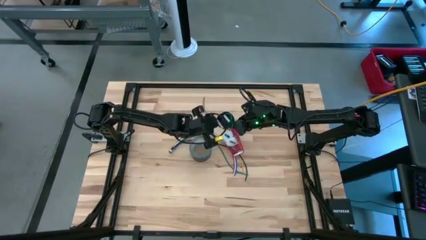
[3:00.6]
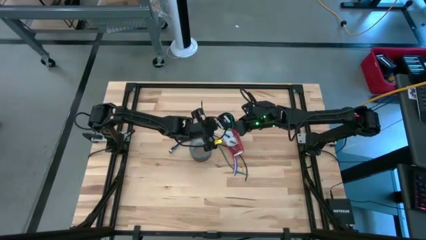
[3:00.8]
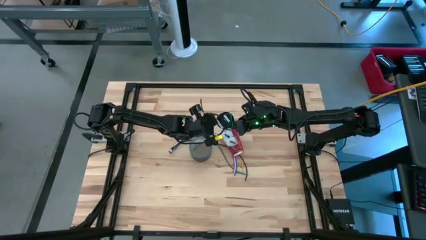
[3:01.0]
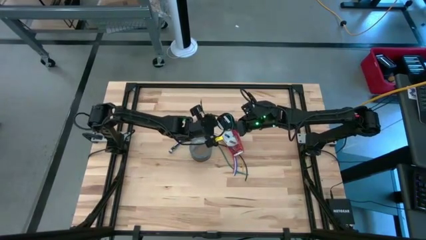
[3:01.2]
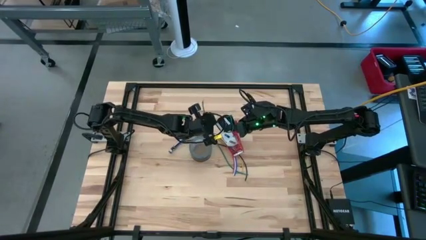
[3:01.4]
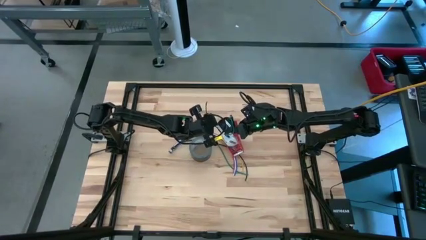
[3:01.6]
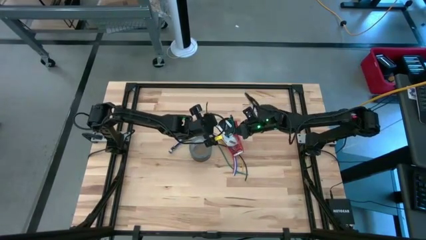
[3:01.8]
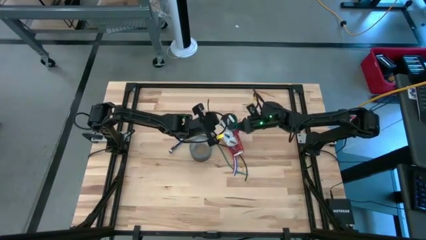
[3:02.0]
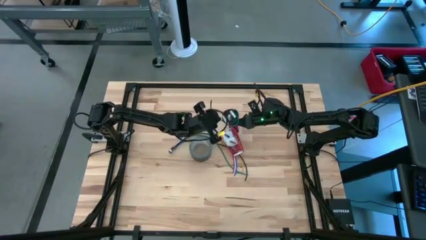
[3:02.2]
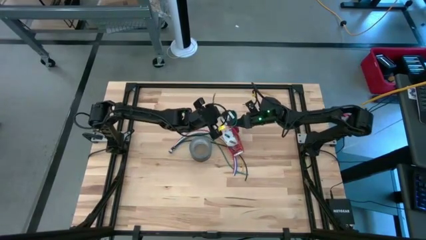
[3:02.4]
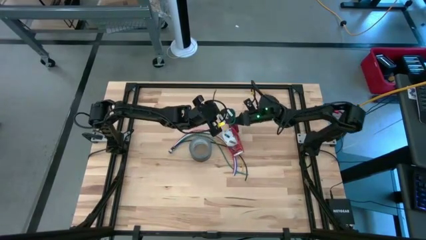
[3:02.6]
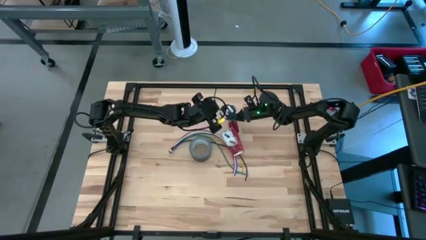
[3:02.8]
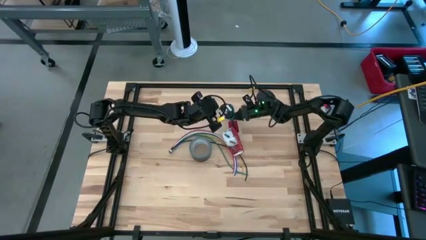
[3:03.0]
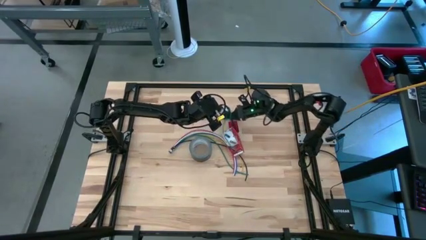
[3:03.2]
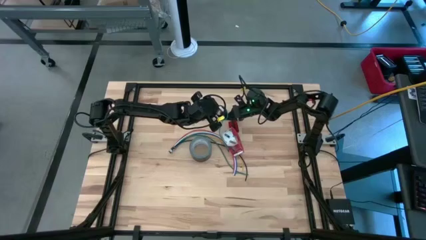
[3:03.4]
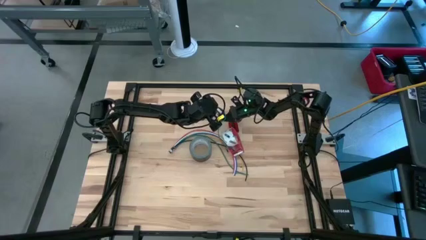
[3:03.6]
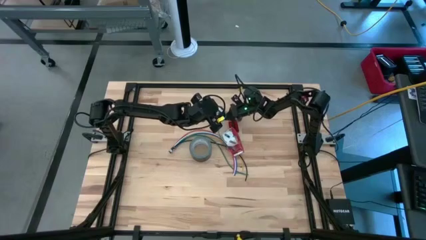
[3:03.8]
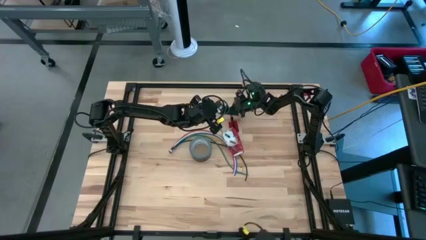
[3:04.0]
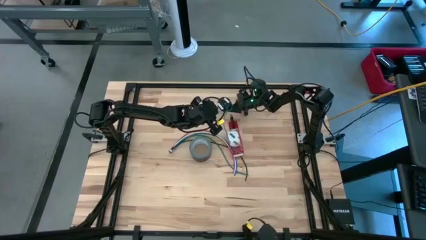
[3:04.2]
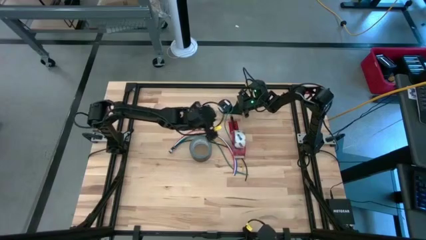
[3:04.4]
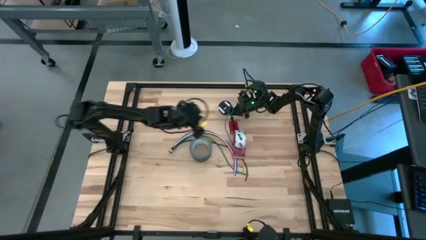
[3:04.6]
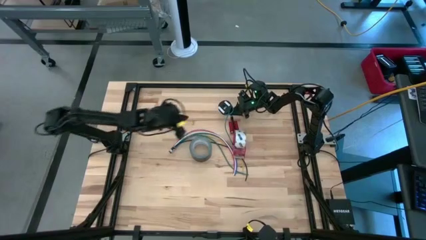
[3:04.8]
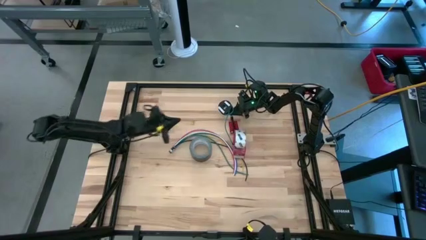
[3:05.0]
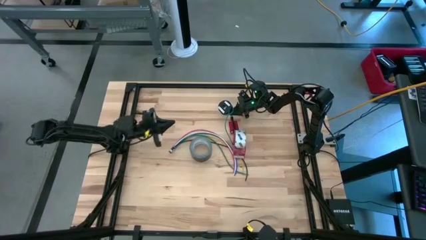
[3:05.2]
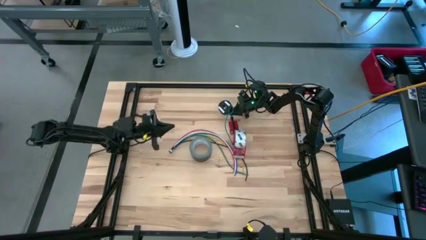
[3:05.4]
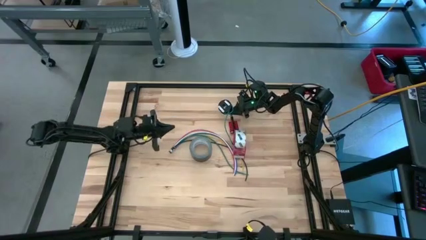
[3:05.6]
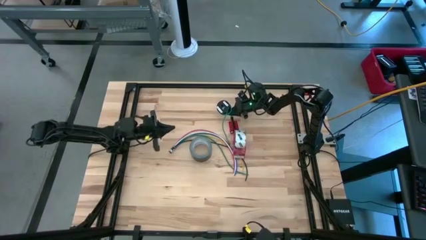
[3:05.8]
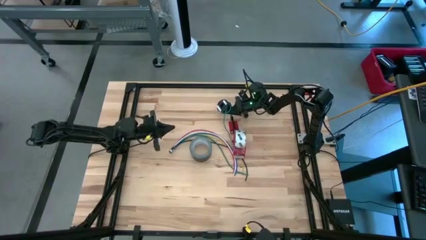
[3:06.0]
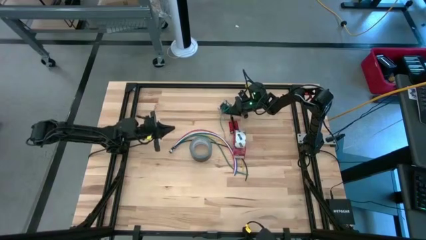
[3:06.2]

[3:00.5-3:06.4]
Task: Coil cords
Put the coil wire on the table

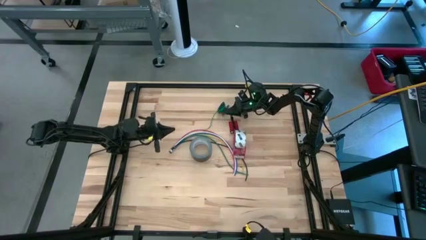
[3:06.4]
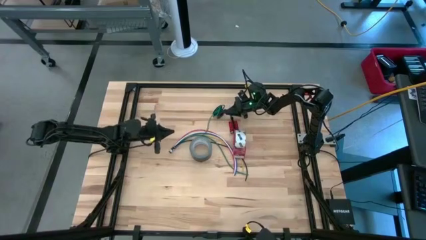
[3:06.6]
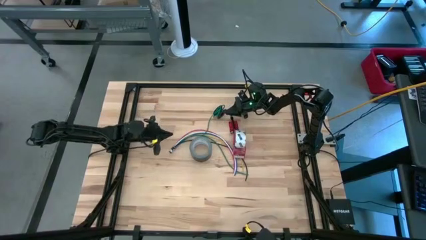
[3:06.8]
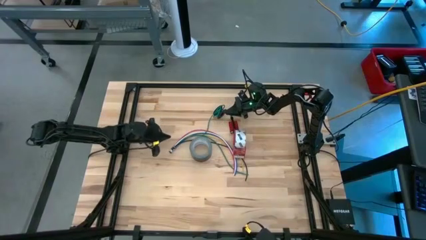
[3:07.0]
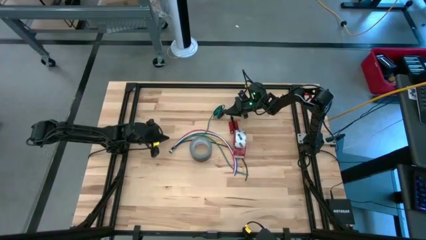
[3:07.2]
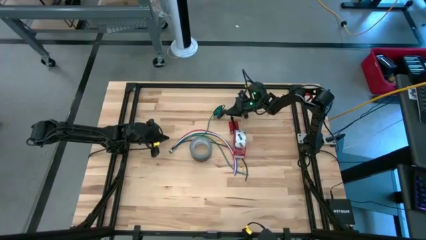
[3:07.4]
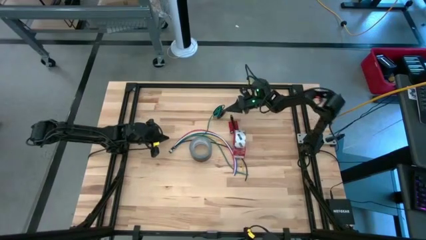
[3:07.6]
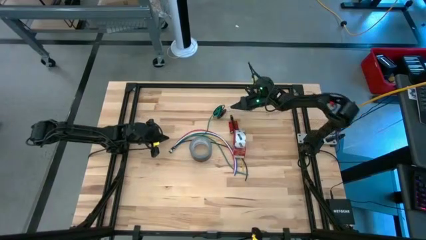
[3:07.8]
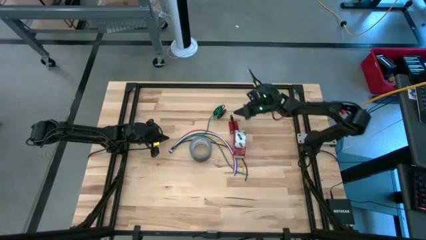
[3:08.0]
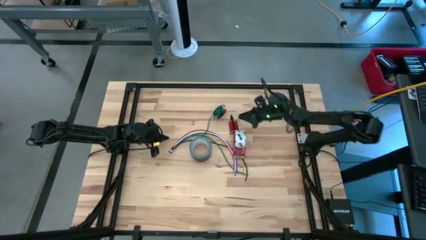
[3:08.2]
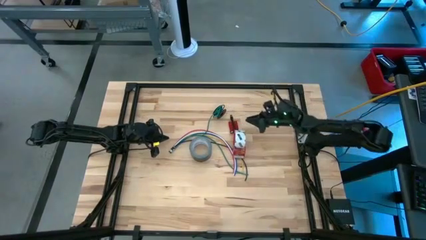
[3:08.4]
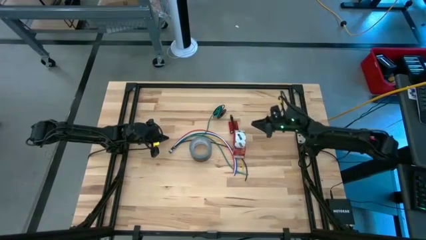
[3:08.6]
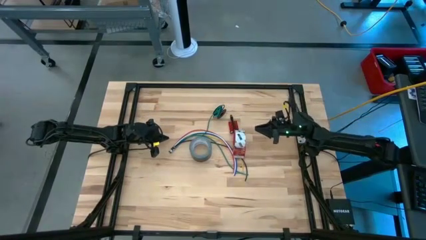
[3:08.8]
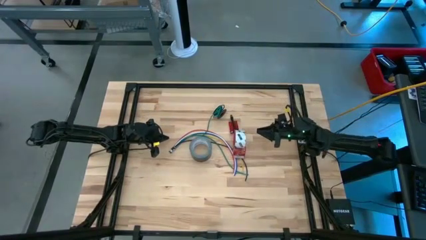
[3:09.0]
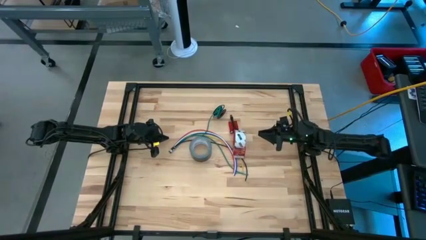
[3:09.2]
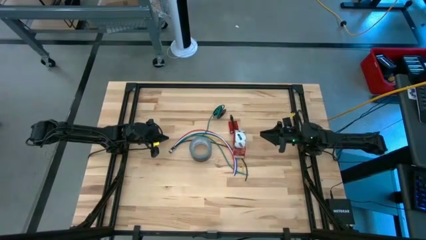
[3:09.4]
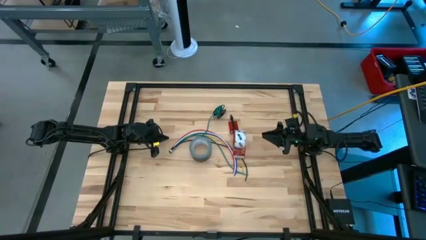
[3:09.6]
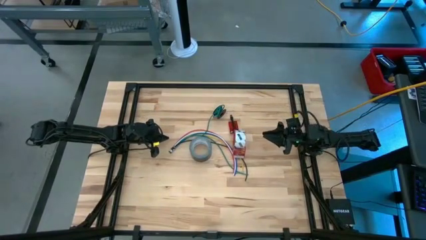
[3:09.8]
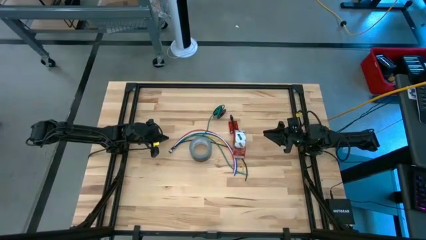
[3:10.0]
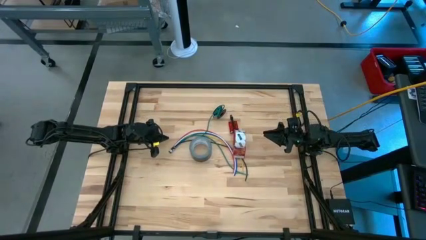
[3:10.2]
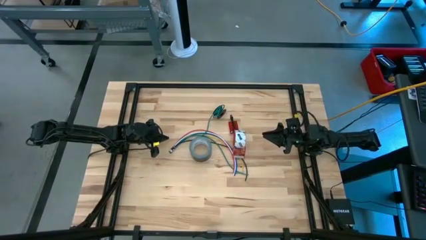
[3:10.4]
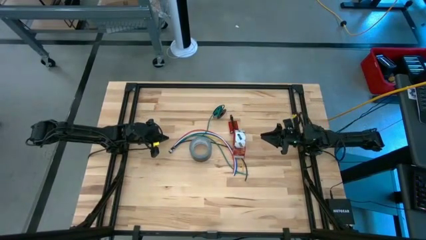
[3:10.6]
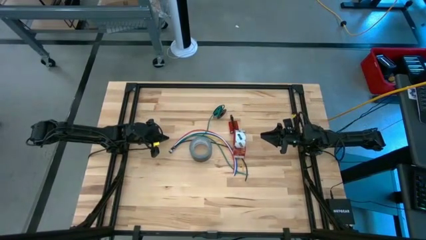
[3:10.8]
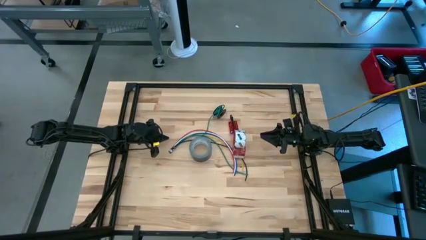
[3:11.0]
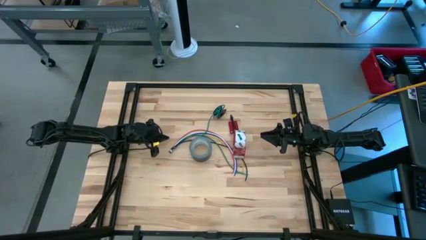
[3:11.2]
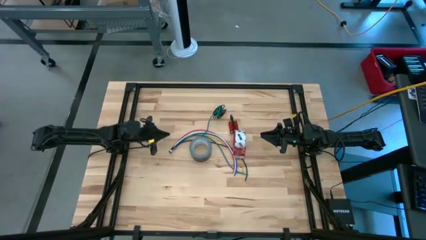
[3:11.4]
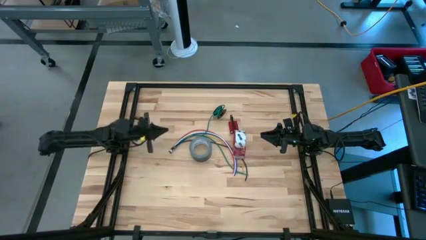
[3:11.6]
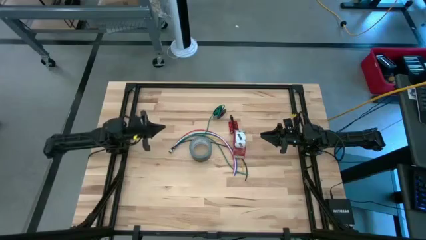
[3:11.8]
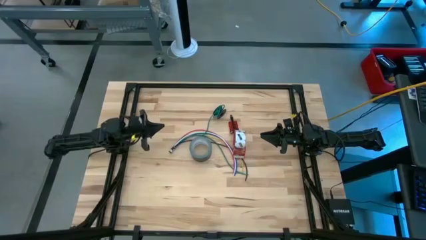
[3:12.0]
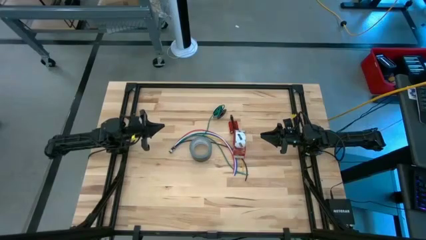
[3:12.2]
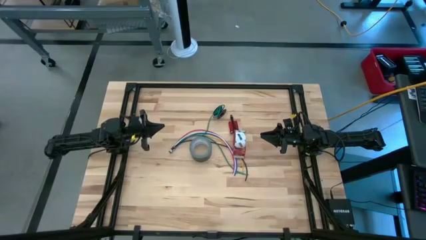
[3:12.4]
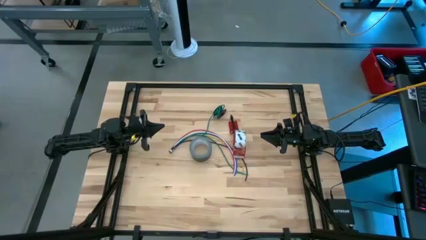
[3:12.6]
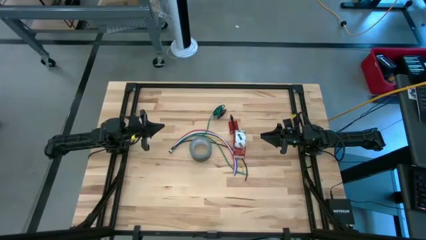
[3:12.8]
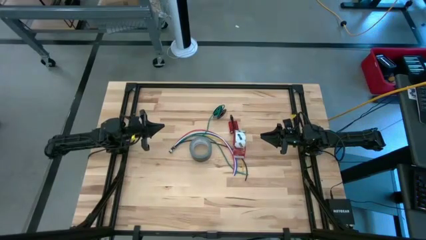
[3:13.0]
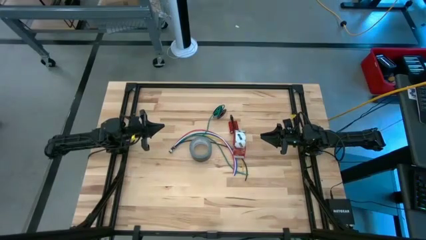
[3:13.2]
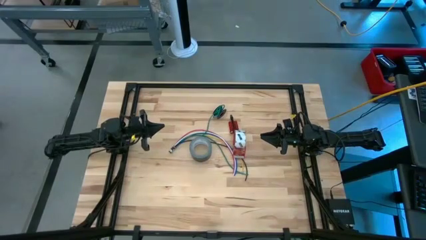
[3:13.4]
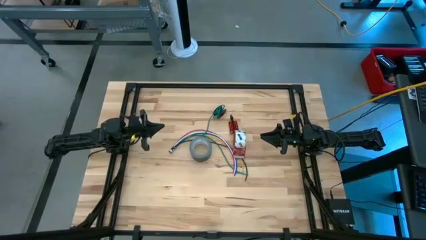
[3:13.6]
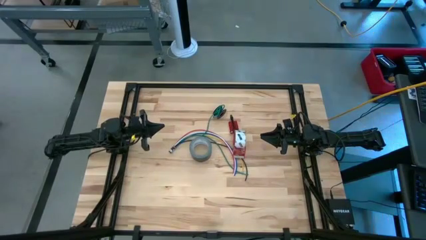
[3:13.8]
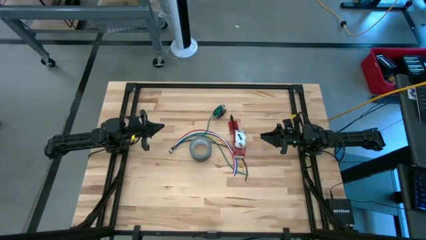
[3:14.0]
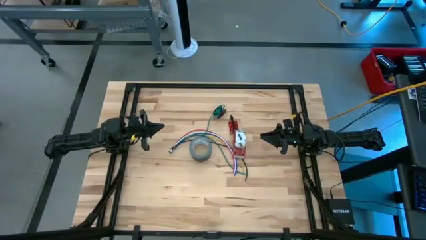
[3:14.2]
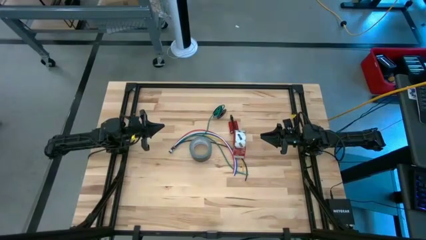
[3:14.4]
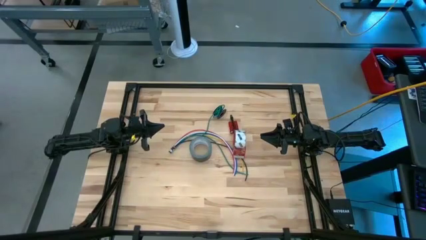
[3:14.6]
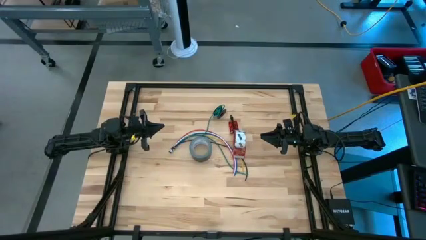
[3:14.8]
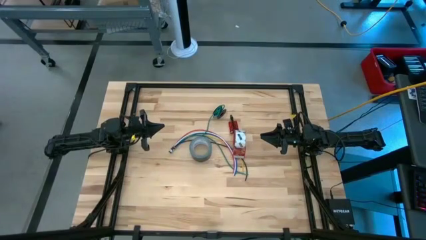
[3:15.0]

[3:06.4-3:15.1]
Return to Home Position

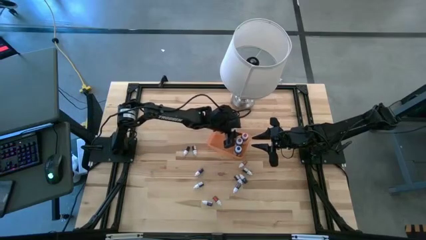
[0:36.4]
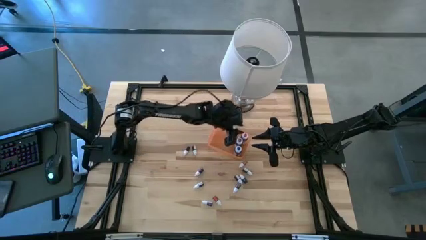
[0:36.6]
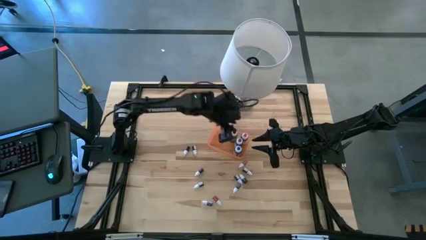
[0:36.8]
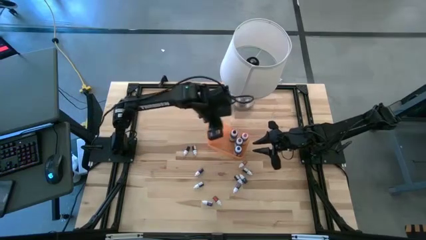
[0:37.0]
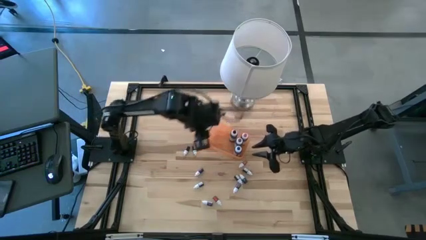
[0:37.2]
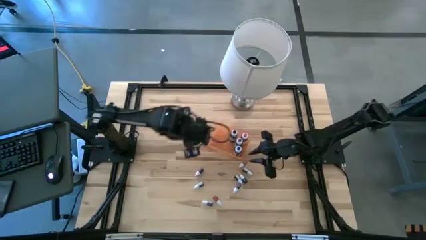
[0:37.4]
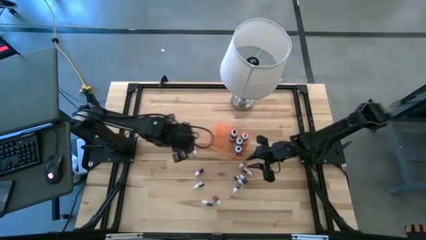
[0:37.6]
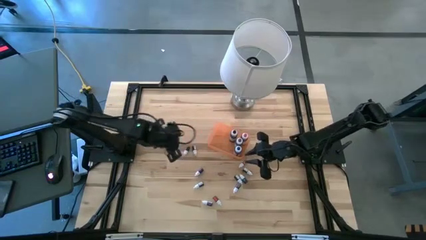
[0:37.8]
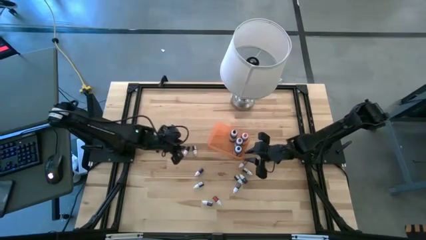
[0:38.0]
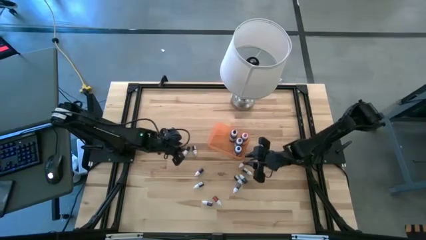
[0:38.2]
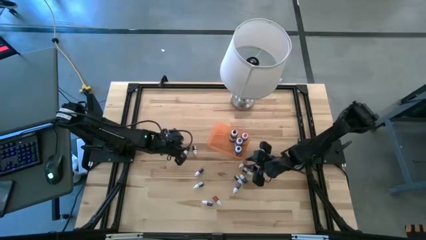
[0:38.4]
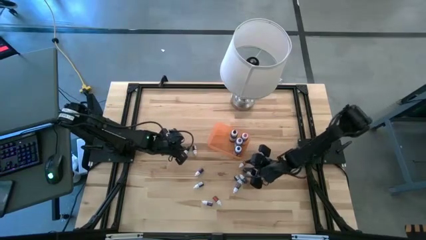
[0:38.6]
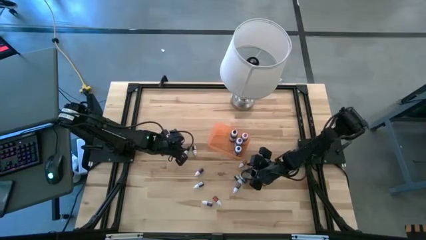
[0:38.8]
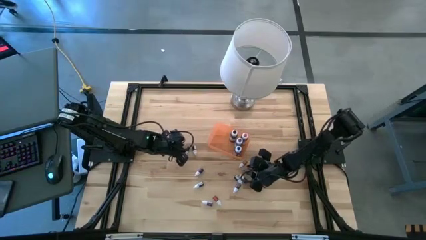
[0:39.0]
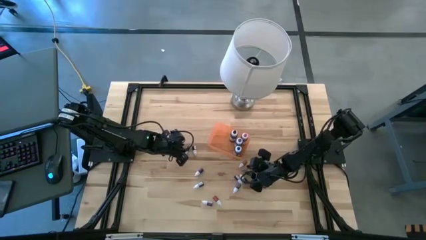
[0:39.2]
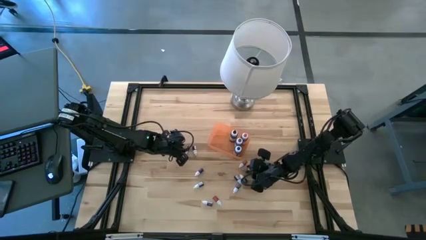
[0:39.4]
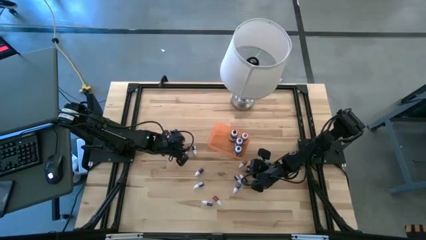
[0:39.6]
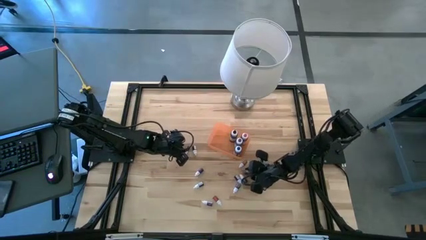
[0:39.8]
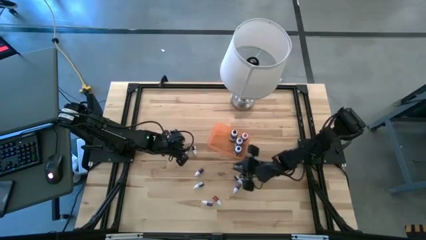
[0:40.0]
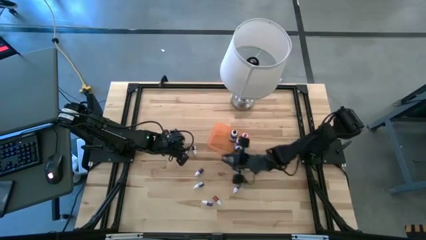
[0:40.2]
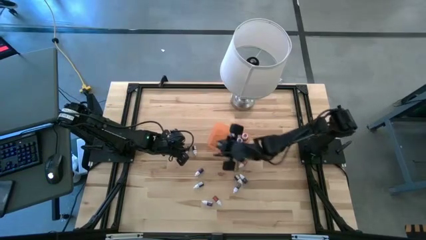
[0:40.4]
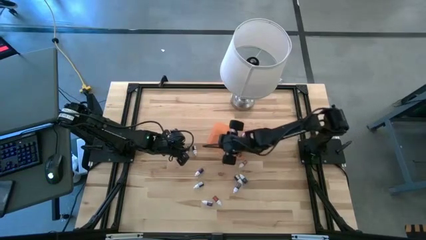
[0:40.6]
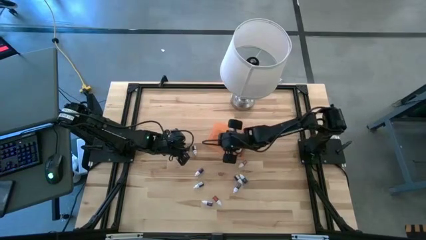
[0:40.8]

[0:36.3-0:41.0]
Task: Pick & Place food coloring
Put the small black food coloring bottle into the orange bin
